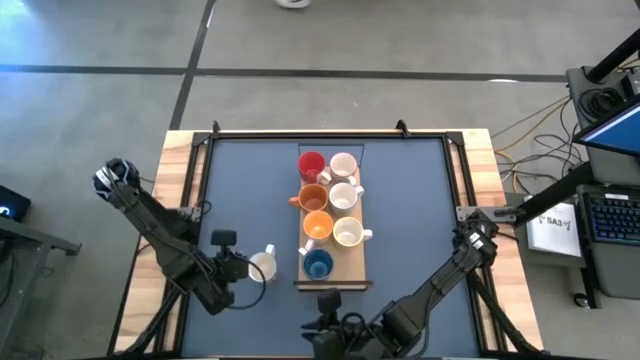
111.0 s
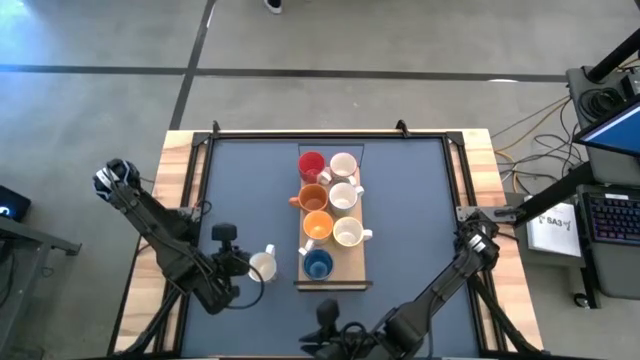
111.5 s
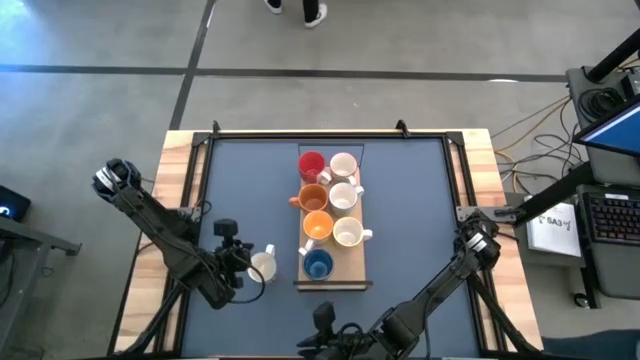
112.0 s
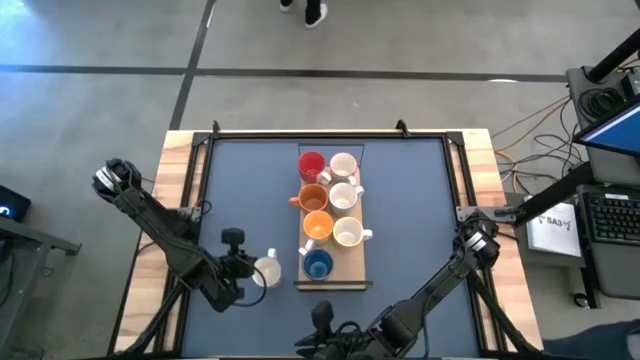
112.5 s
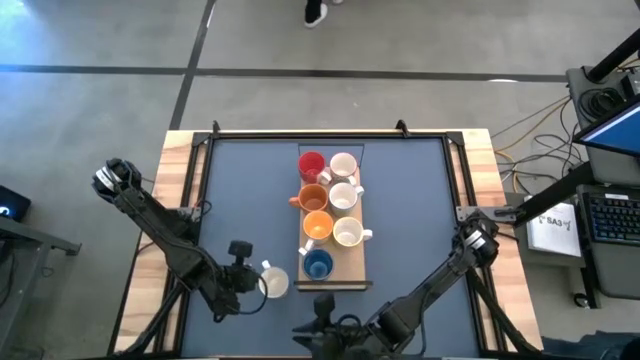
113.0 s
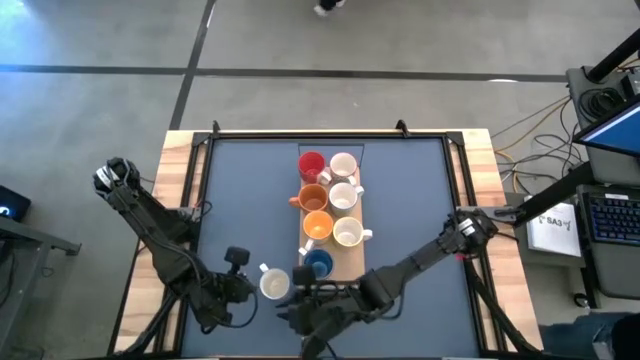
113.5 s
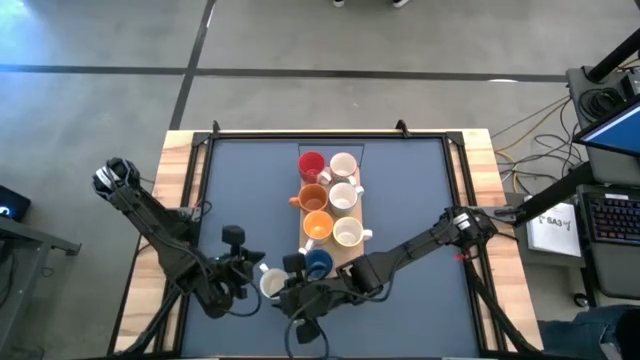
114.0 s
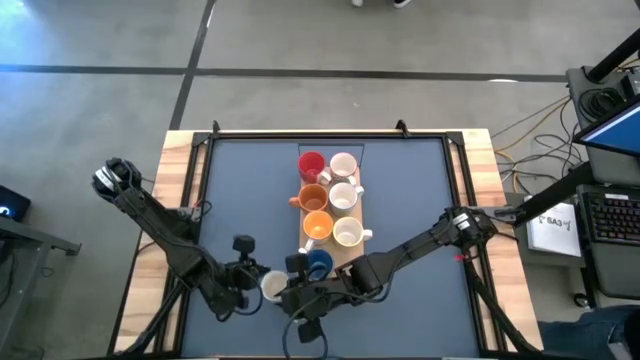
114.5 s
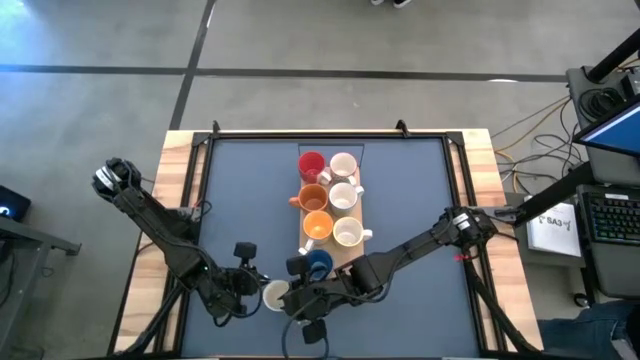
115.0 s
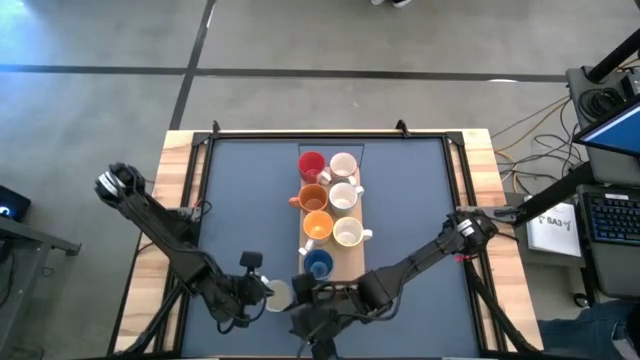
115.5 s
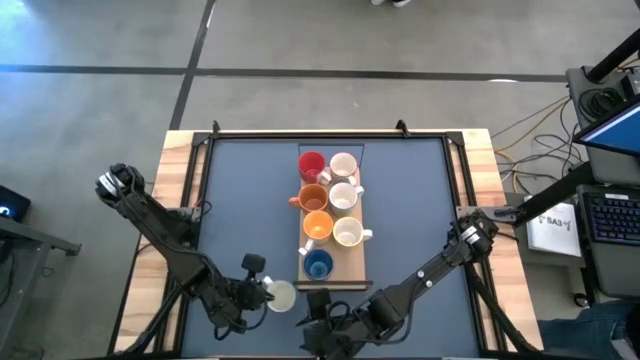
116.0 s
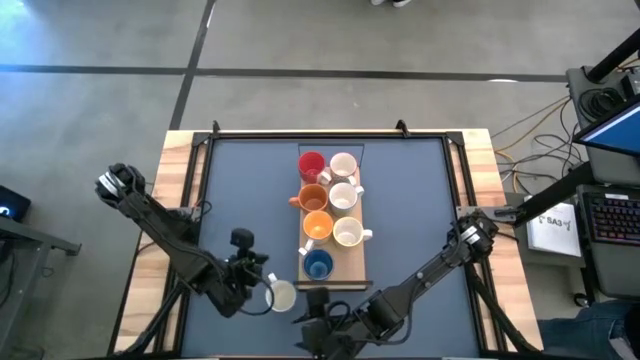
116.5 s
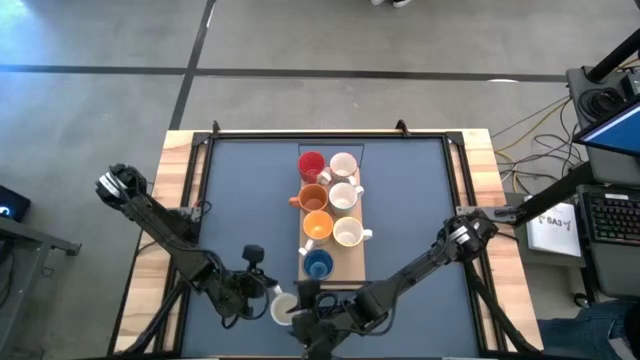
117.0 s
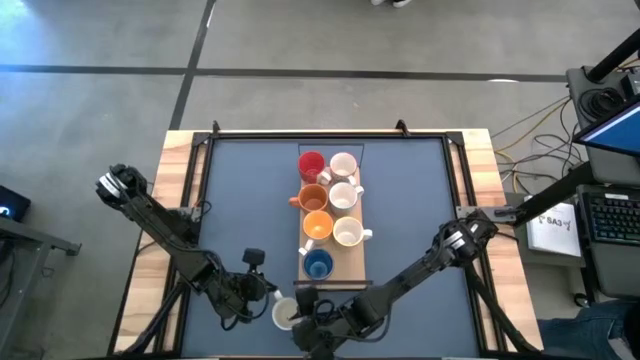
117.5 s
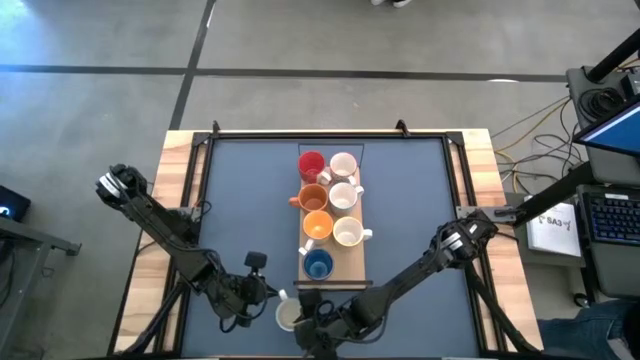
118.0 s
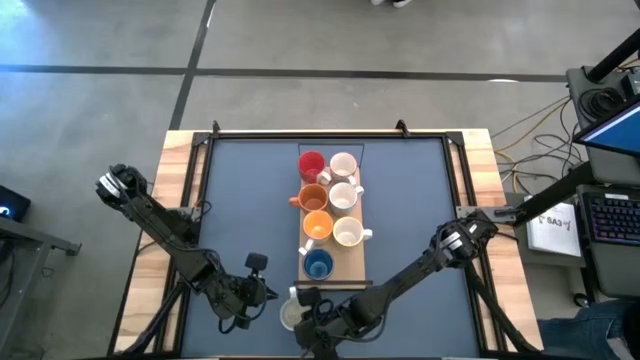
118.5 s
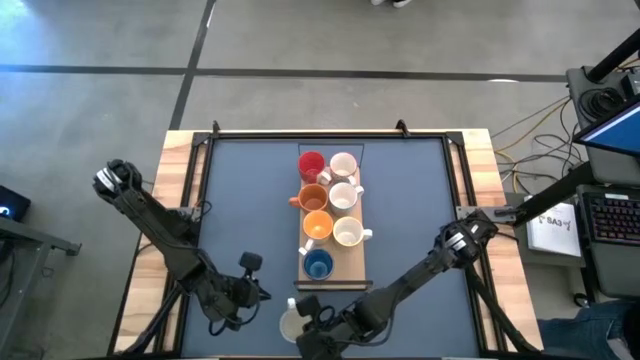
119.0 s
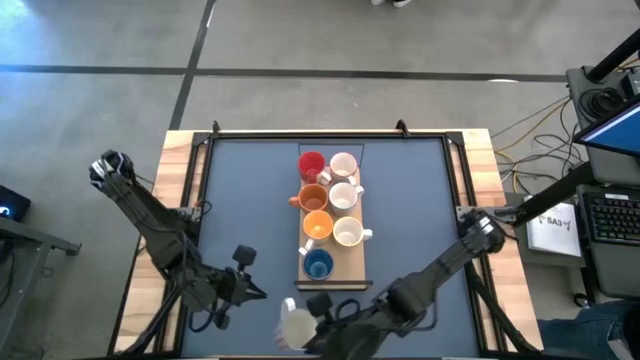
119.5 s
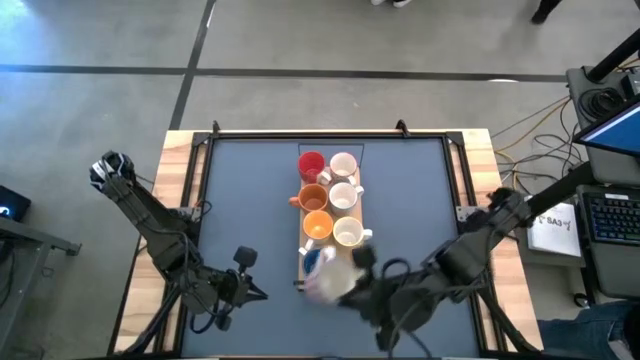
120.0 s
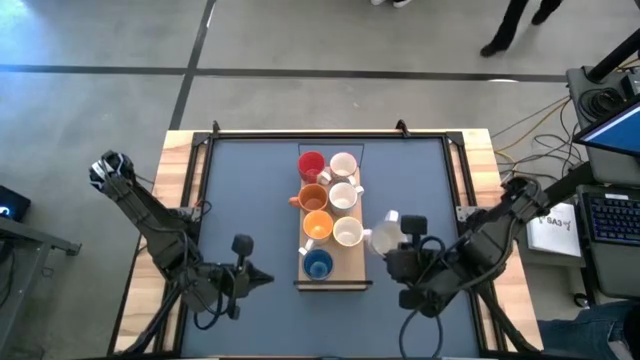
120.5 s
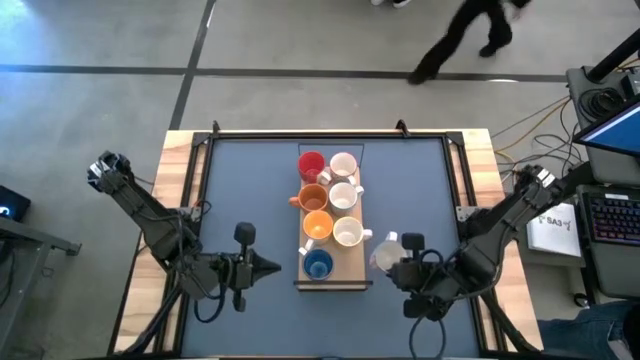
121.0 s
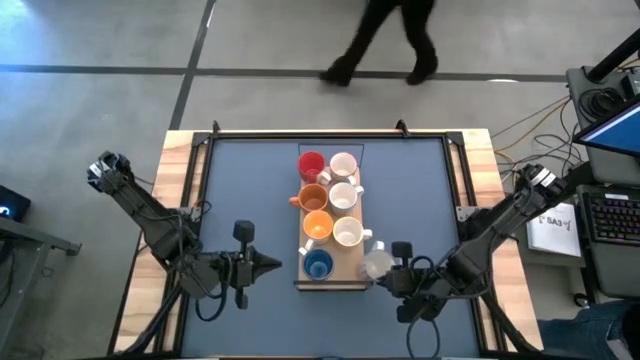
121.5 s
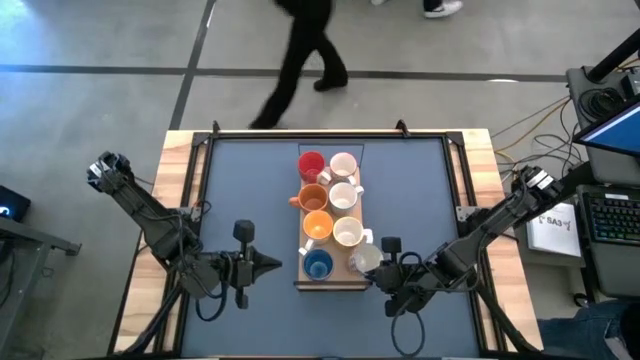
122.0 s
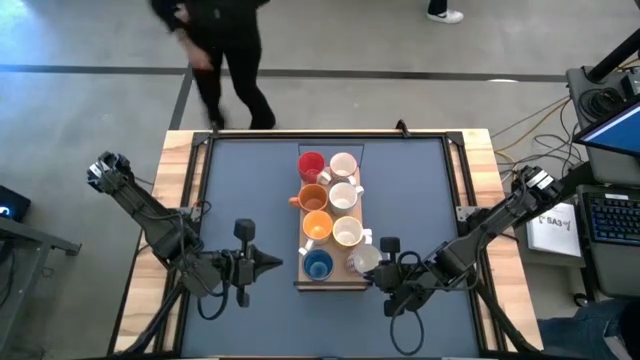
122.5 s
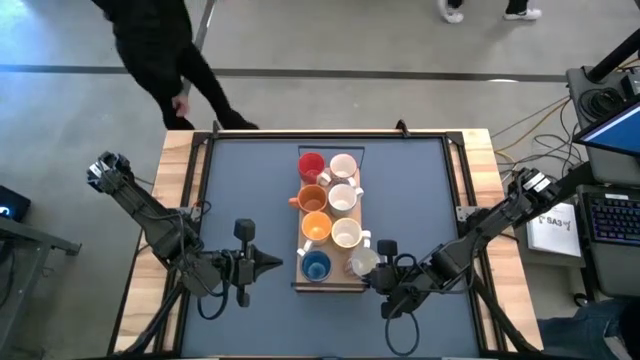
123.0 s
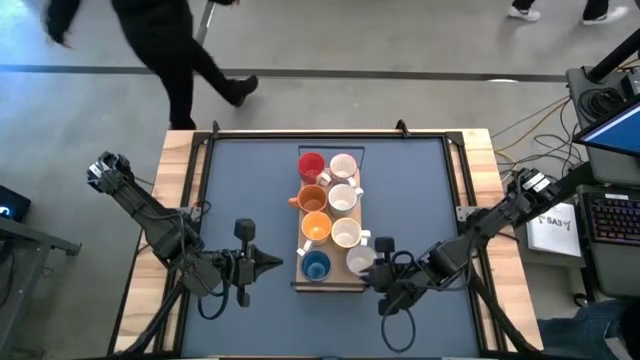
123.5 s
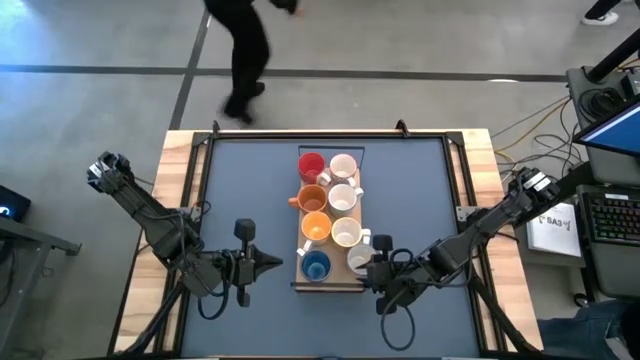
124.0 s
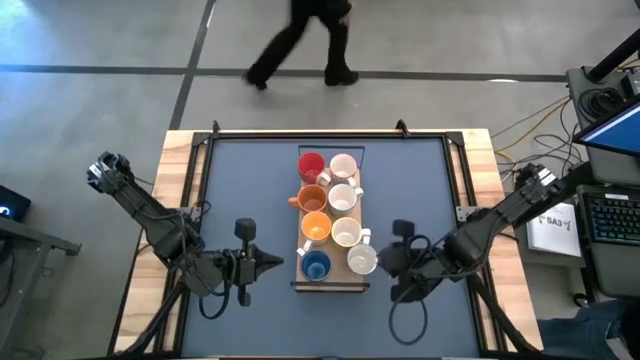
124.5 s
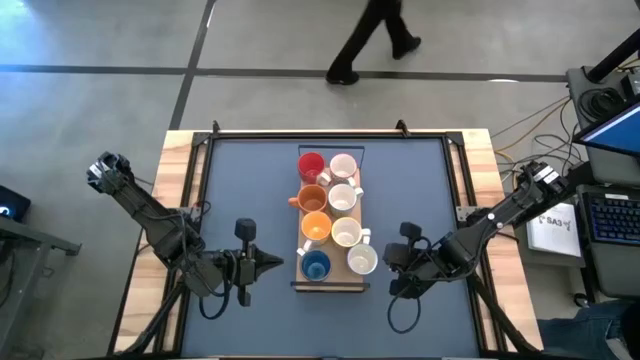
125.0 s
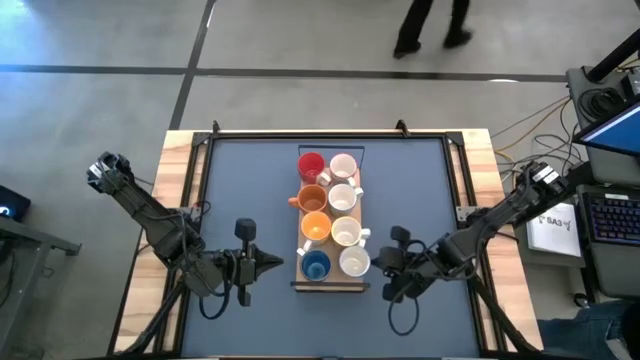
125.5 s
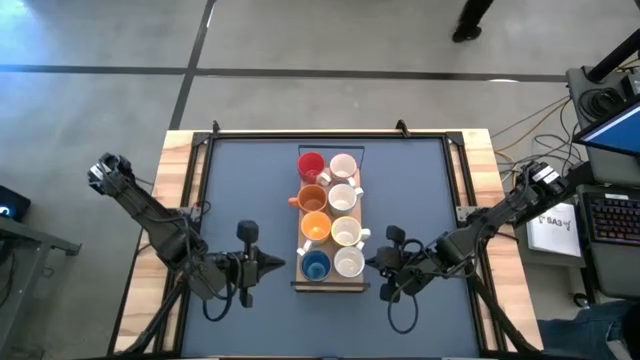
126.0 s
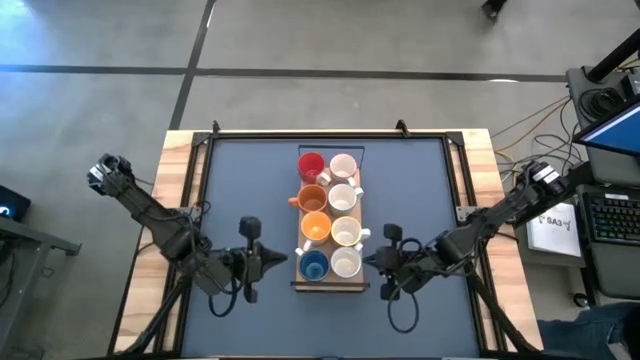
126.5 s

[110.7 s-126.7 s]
Task: Place coffee mugs
Put the red patterned mug on the shelf

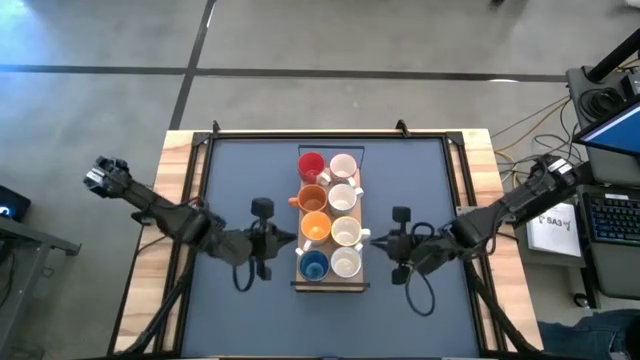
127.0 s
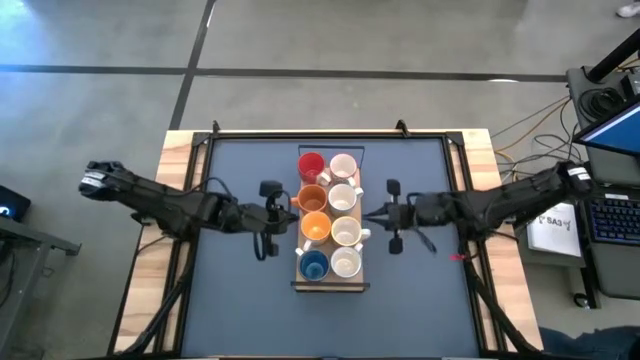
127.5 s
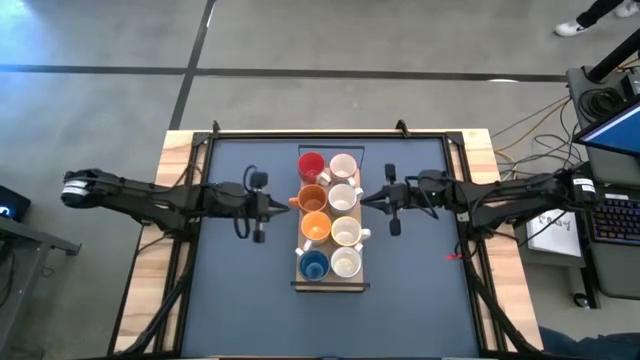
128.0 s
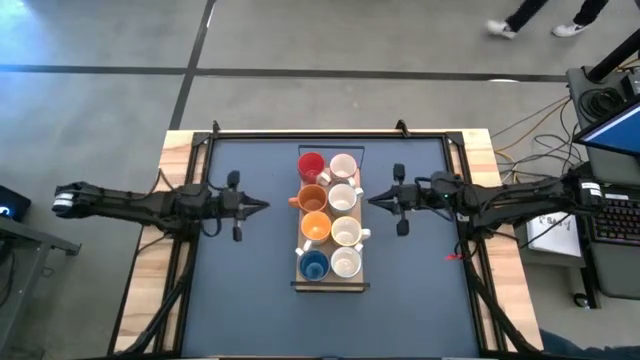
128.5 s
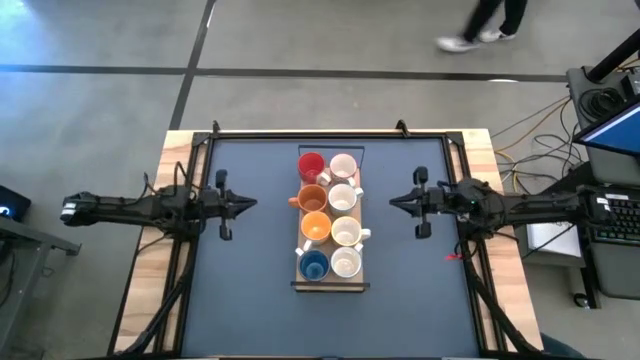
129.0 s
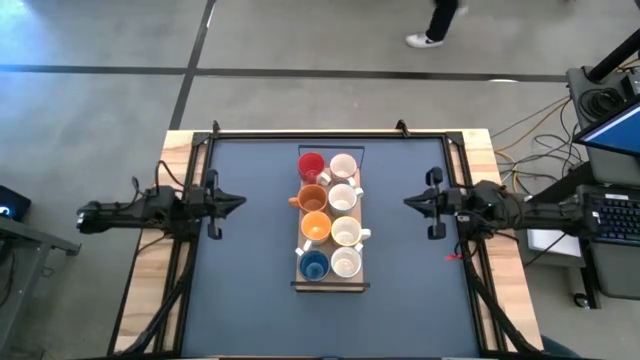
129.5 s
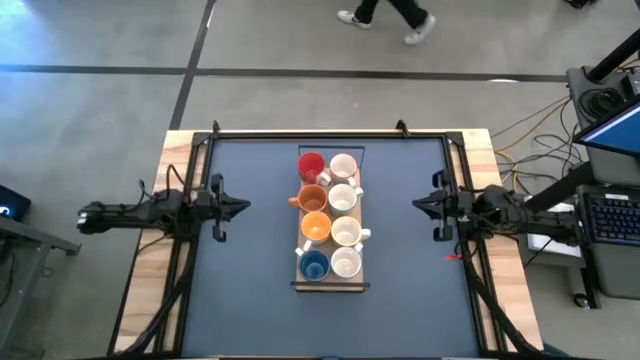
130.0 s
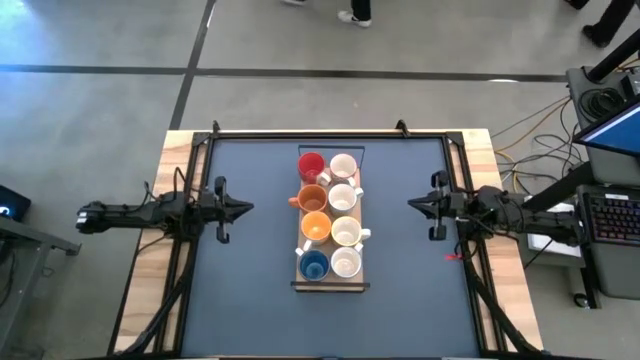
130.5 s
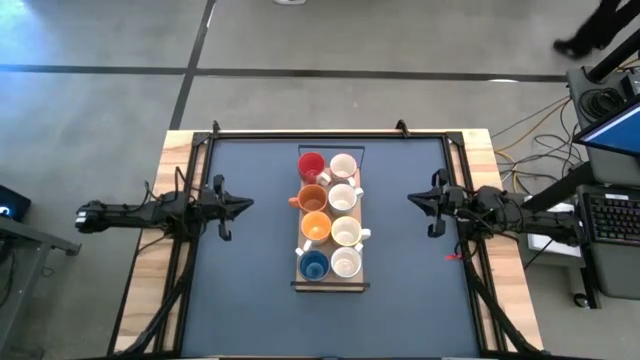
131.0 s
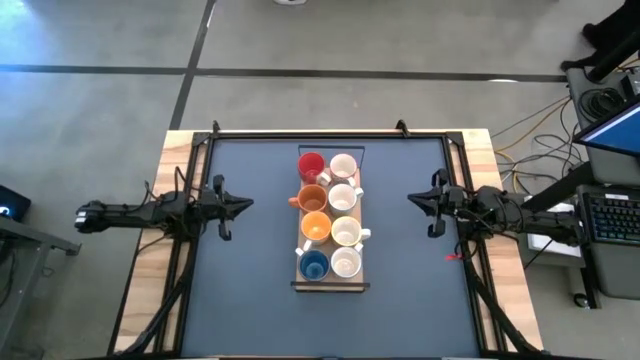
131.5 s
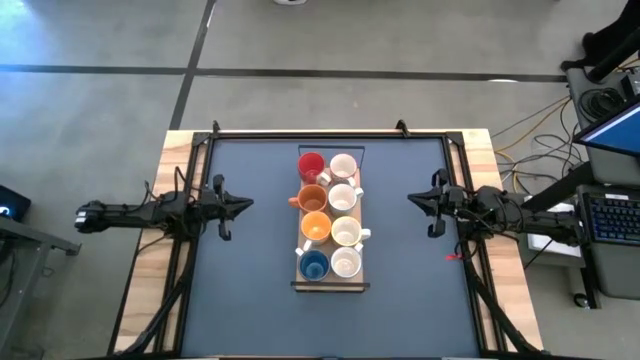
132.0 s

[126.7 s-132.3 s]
Return to Home Position
